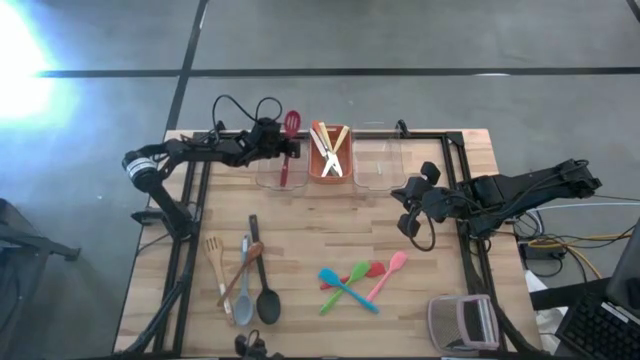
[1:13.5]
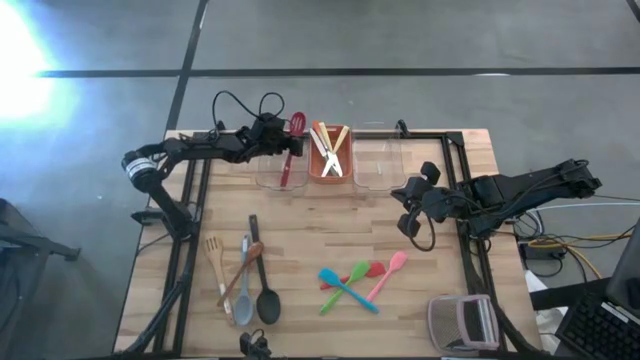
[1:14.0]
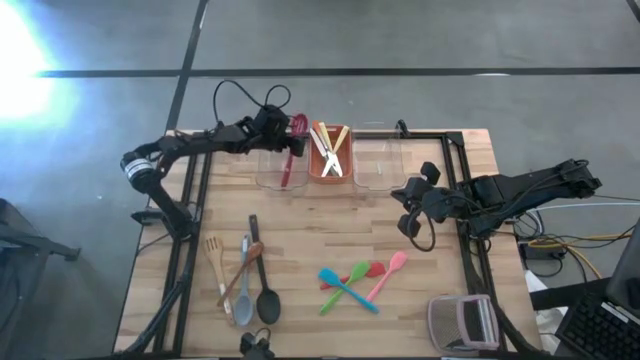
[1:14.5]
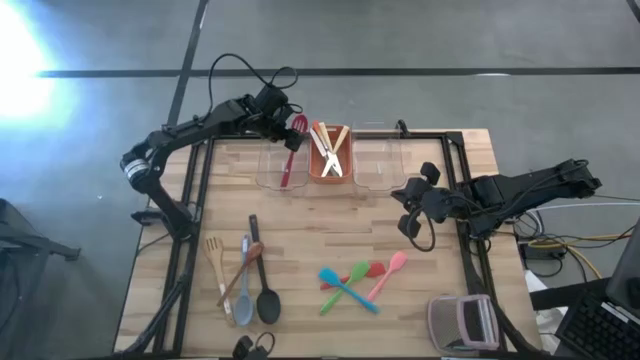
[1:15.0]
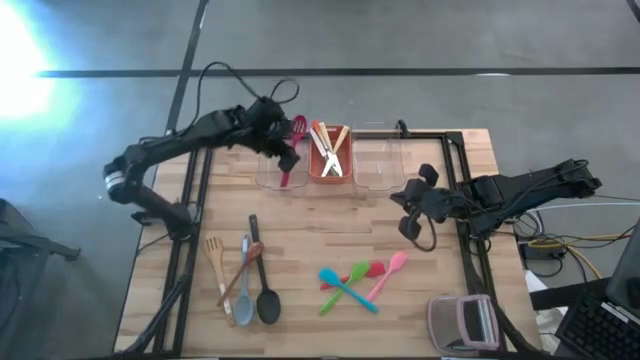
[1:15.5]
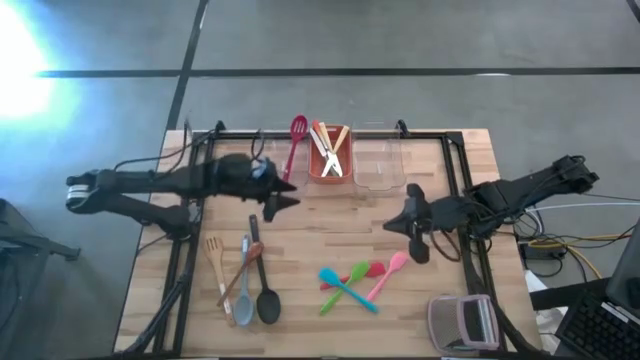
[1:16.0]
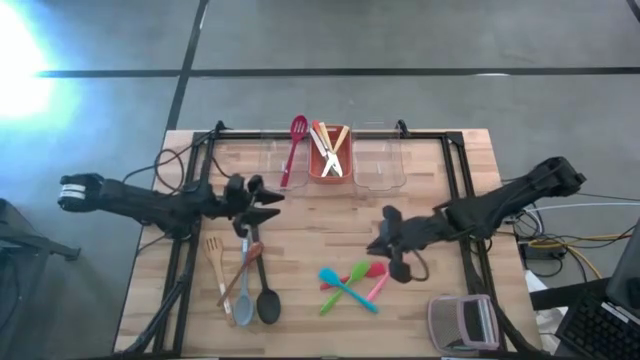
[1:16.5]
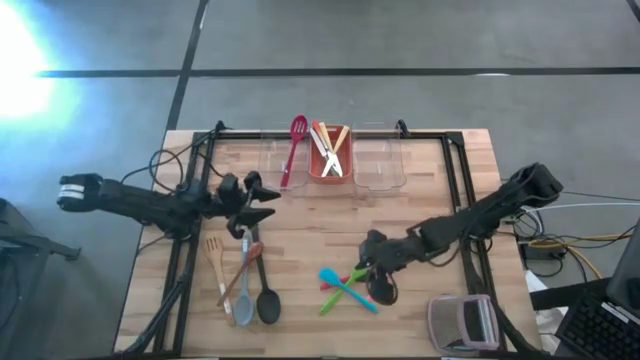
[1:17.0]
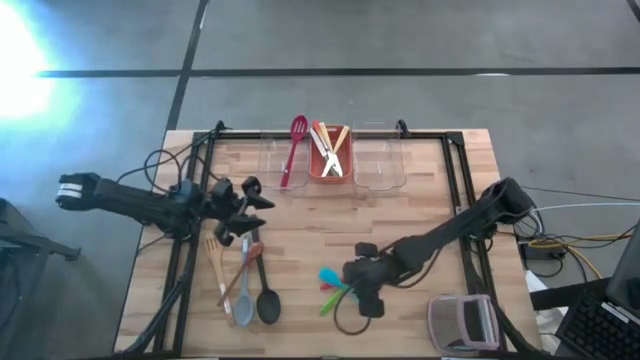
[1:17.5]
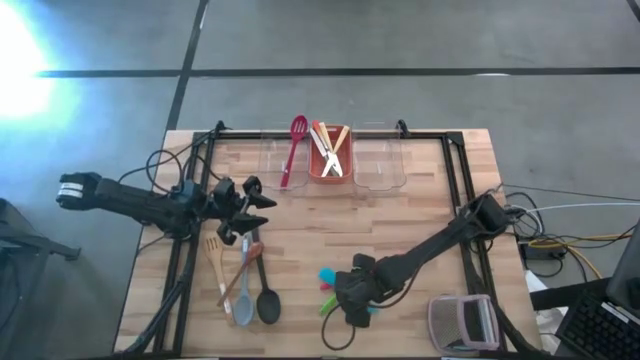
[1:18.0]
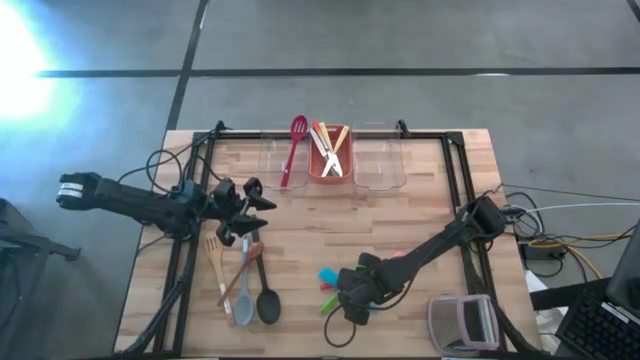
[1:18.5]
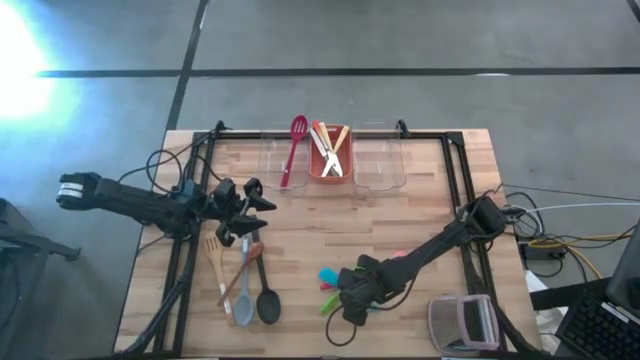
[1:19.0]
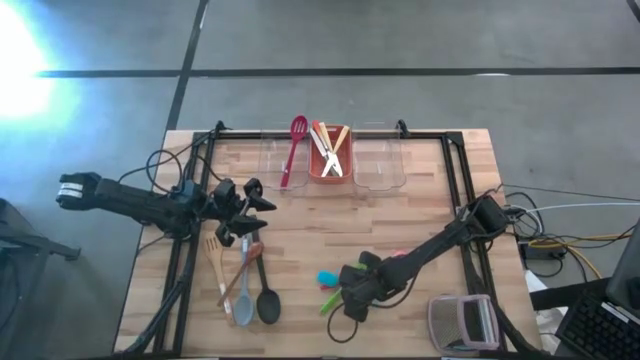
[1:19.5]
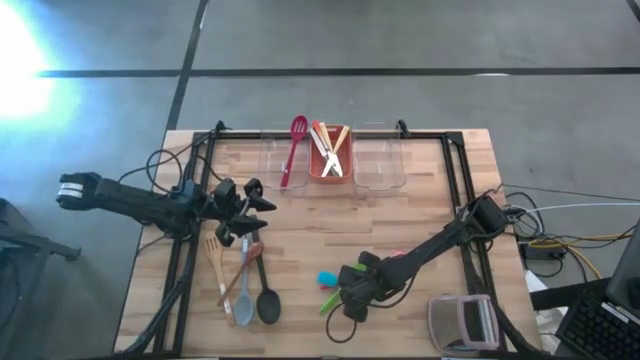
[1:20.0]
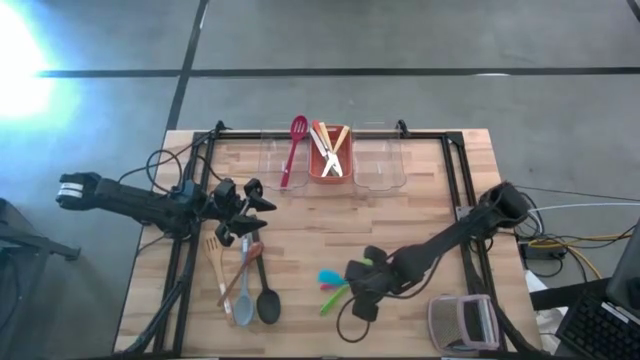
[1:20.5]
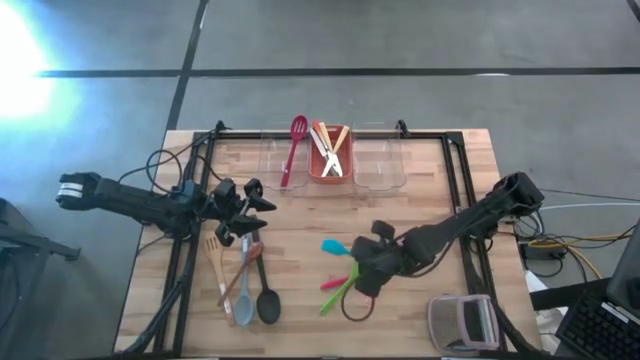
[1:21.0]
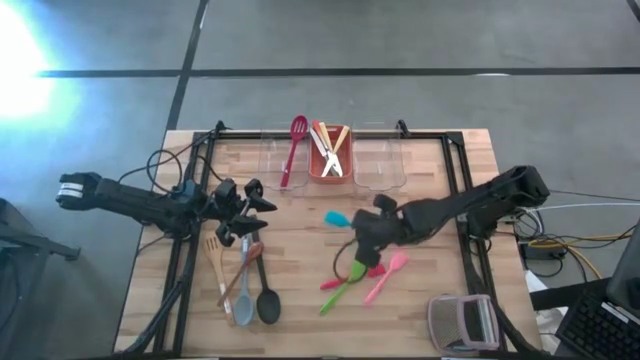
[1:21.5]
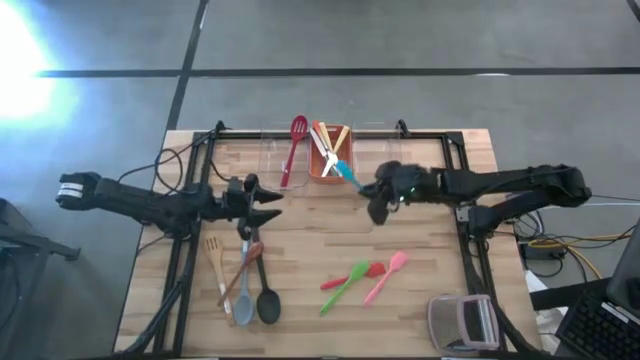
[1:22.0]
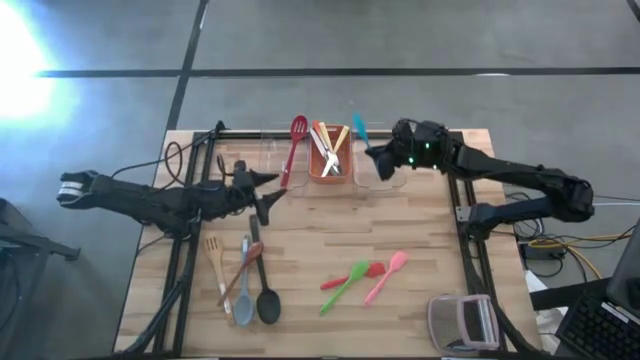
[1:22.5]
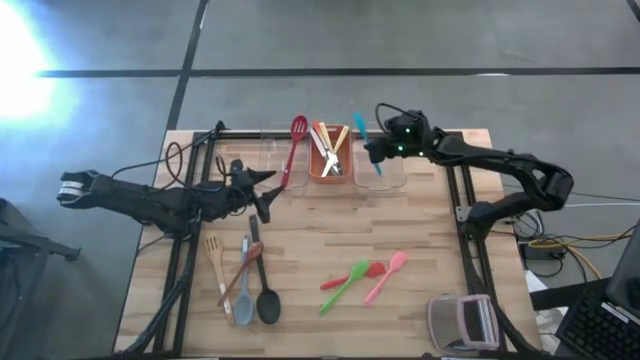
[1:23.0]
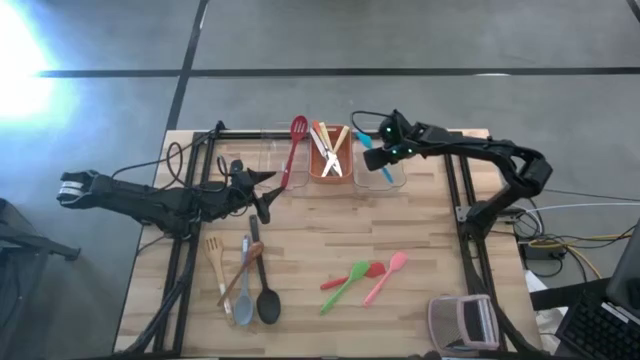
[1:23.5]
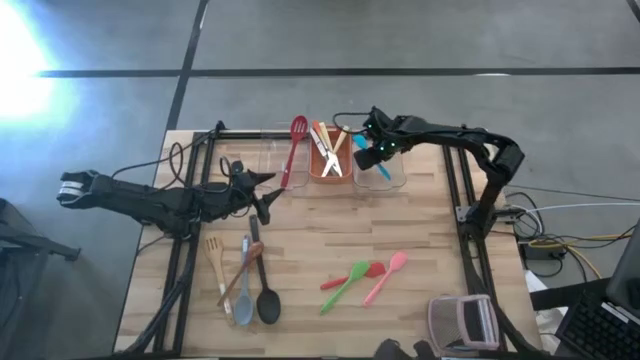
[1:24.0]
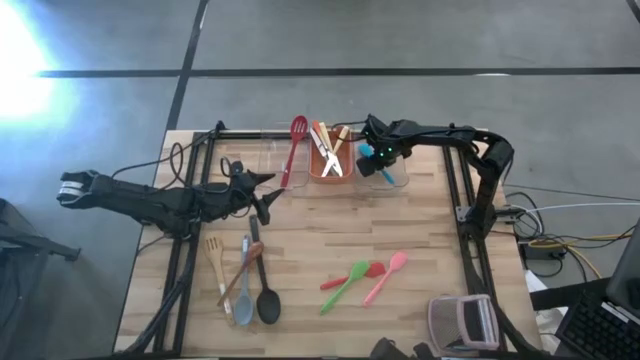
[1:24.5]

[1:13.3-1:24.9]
Task: Pick & Place Kitchen Items
Put the blue spatula into the right transparent bin

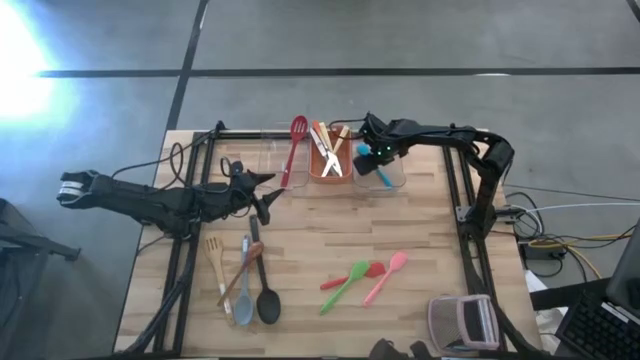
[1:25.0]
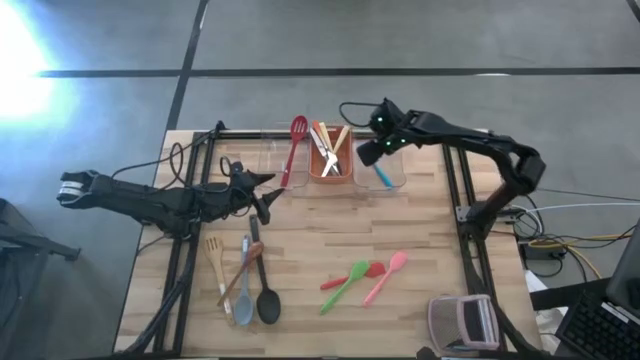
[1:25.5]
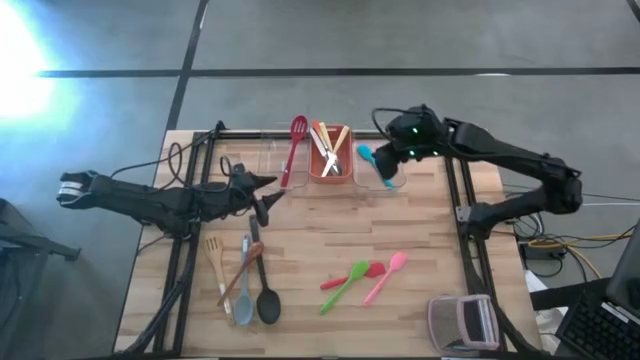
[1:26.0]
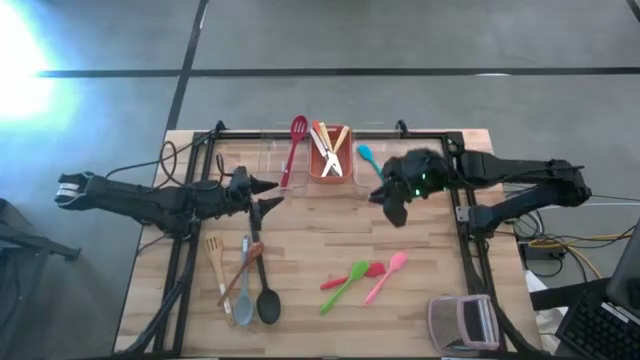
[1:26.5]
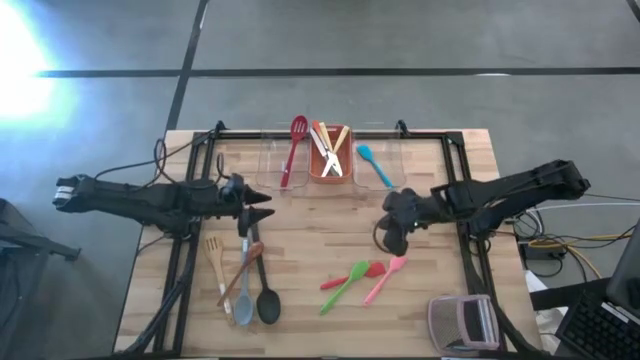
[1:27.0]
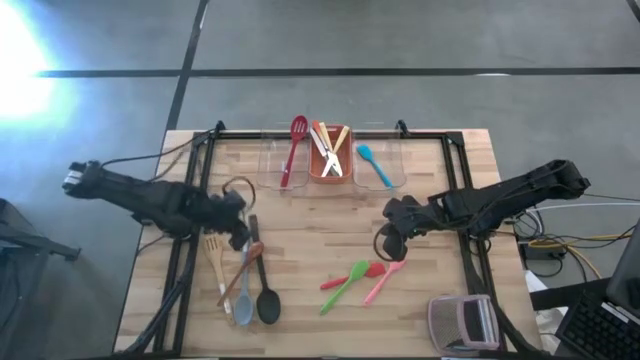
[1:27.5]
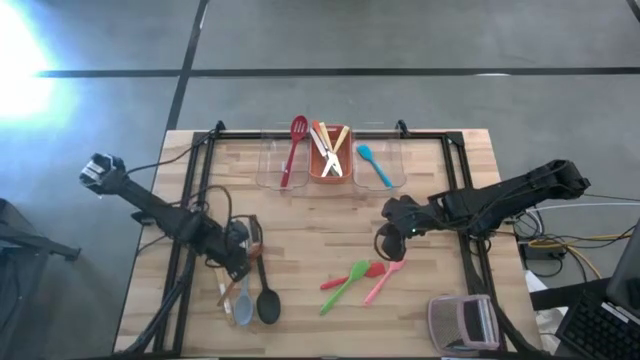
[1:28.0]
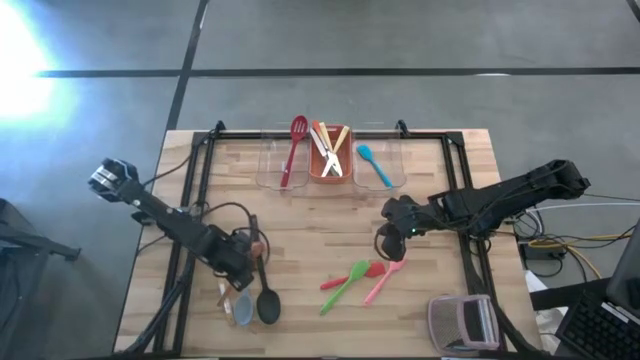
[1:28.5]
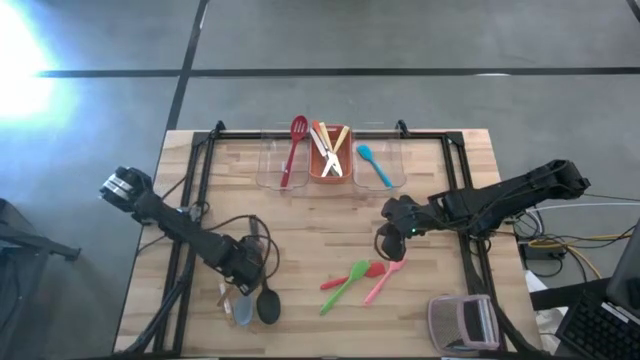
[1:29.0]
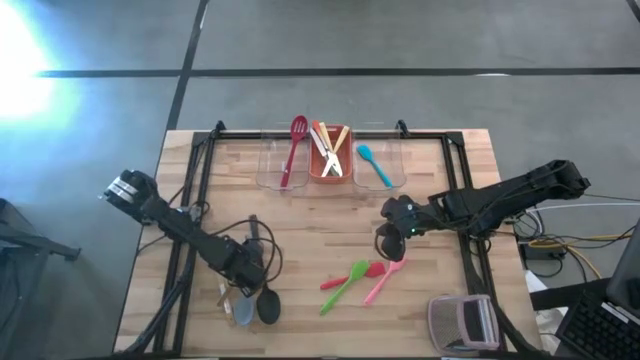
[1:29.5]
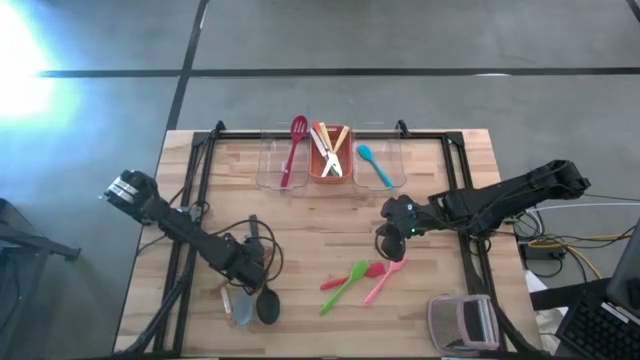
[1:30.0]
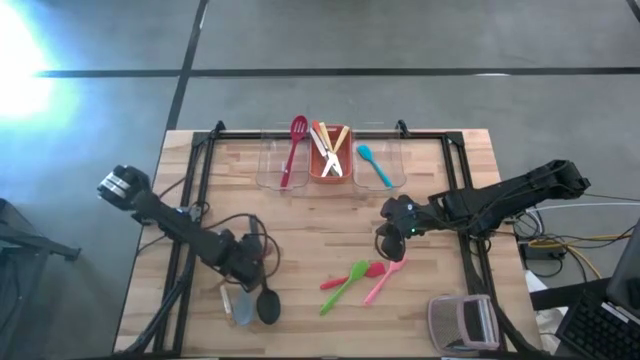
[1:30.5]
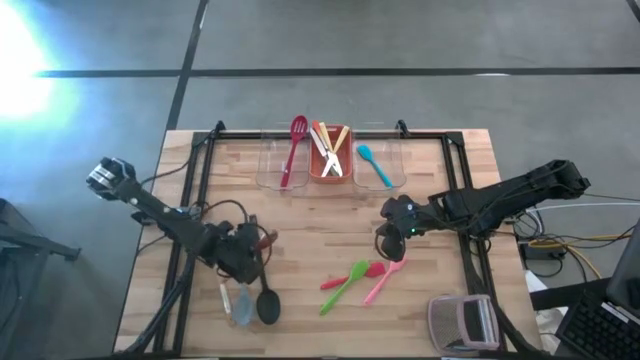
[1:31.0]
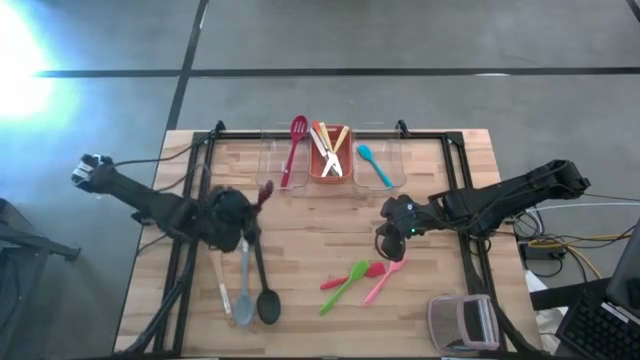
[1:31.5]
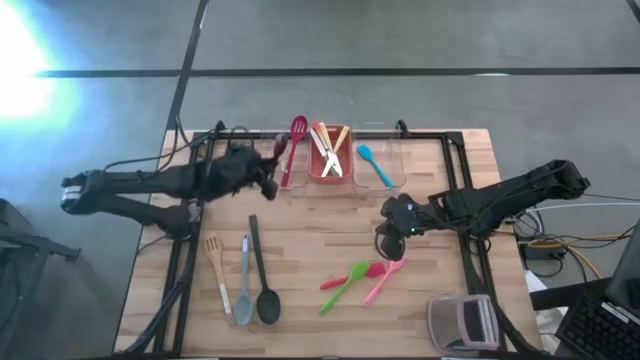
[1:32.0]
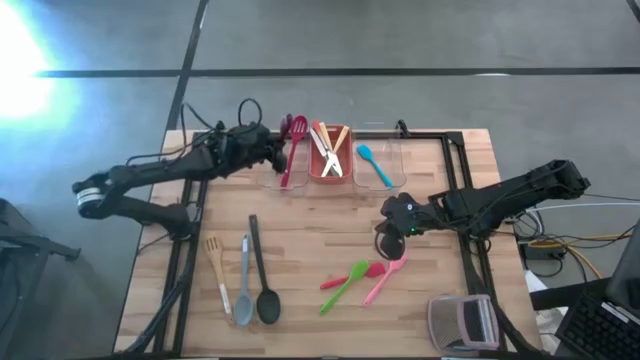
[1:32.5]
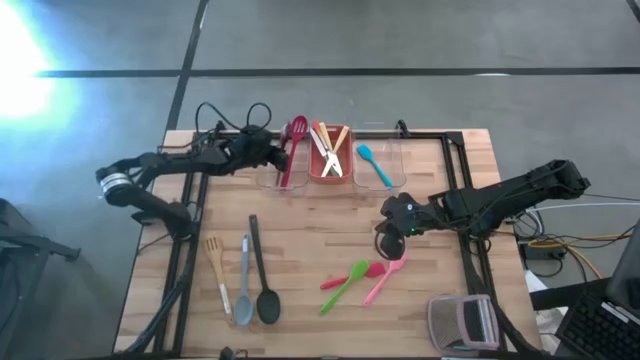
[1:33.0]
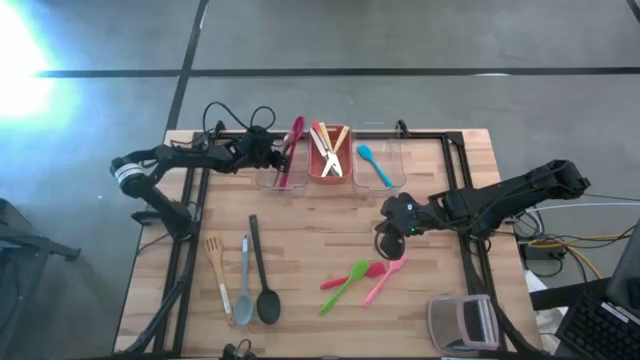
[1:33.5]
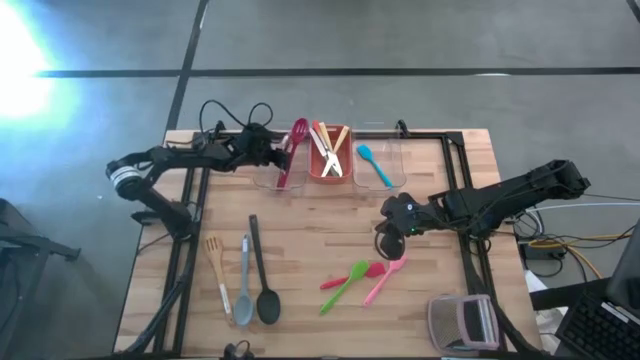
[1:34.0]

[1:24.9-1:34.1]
Put the brown serving spoon into the left transparent bin

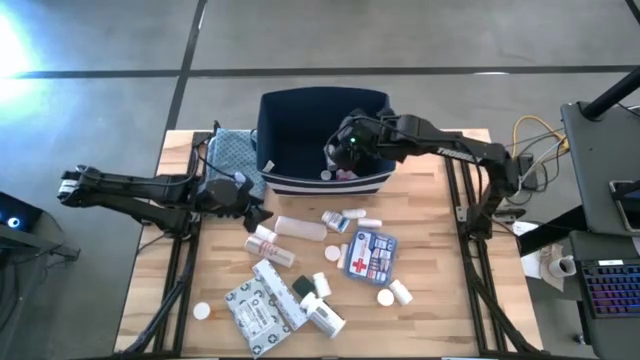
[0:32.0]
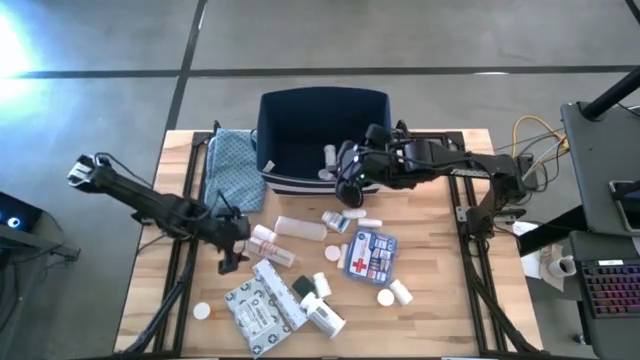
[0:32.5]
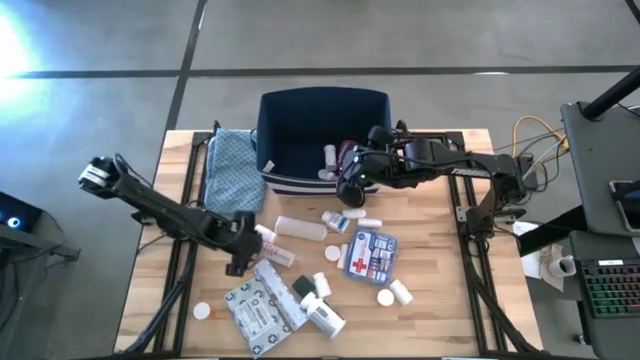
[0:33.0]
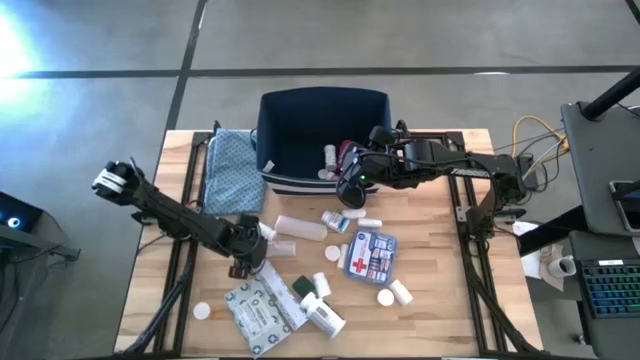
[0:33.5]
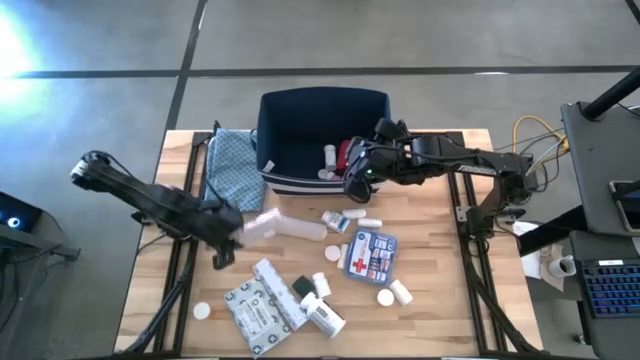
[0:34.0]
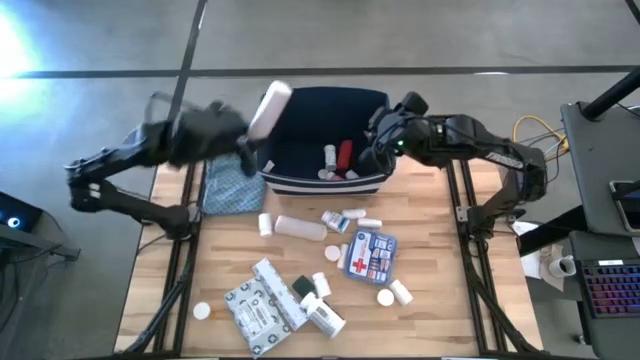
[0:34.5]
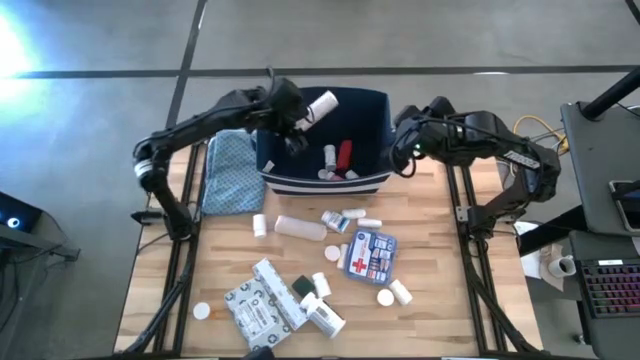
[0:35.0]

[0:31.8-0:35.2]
Task: Pick & place medical supplies in basket/bin
Put the light brown bandage into the blue bin
